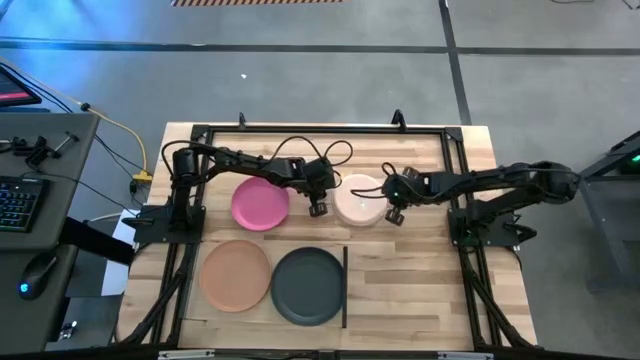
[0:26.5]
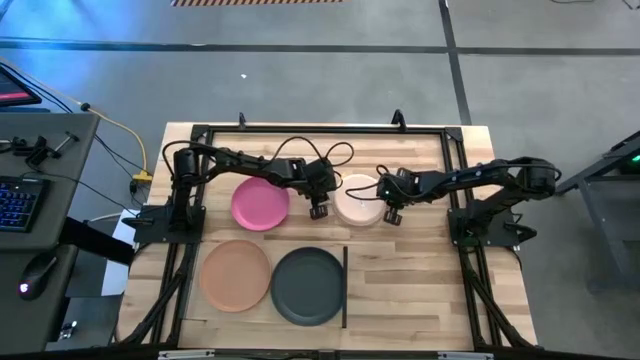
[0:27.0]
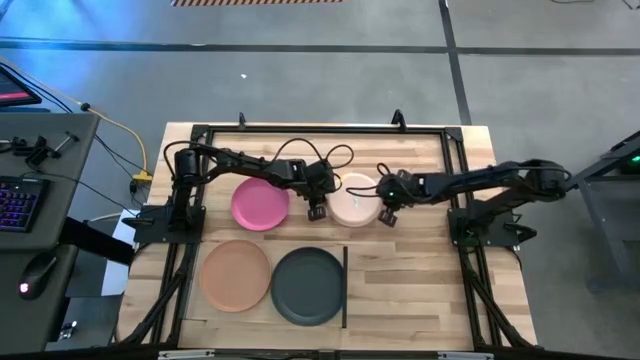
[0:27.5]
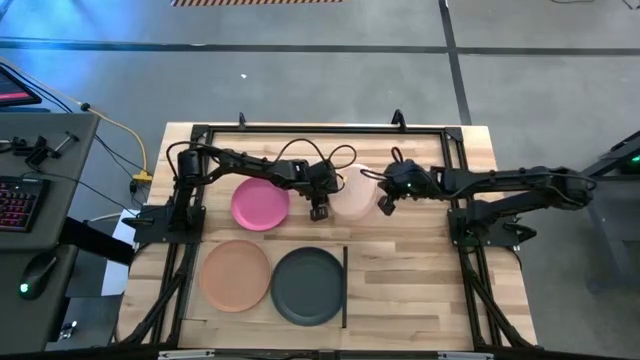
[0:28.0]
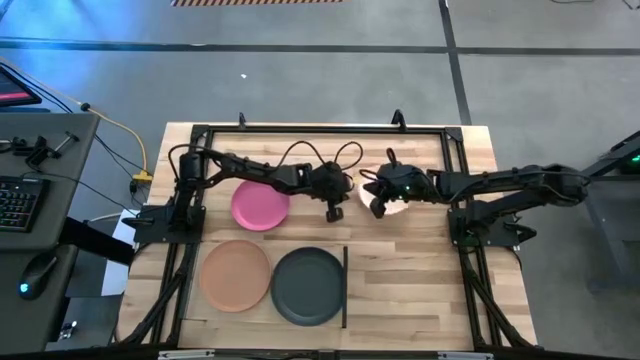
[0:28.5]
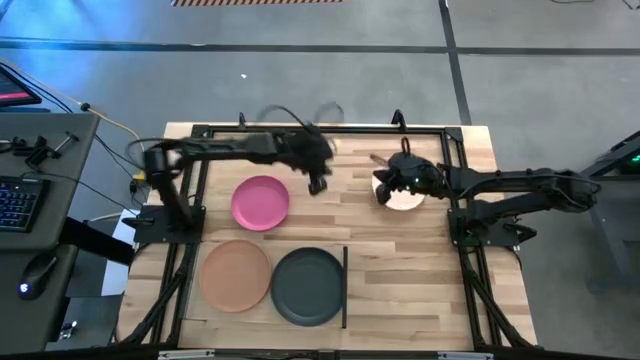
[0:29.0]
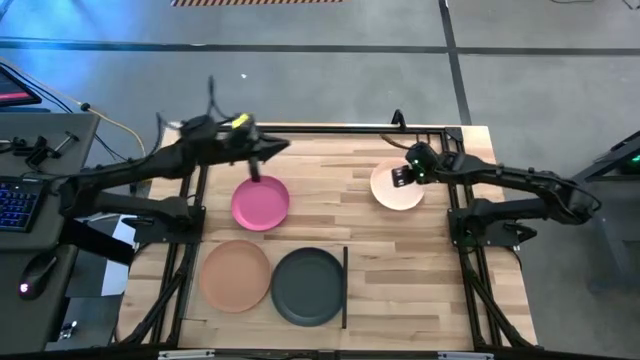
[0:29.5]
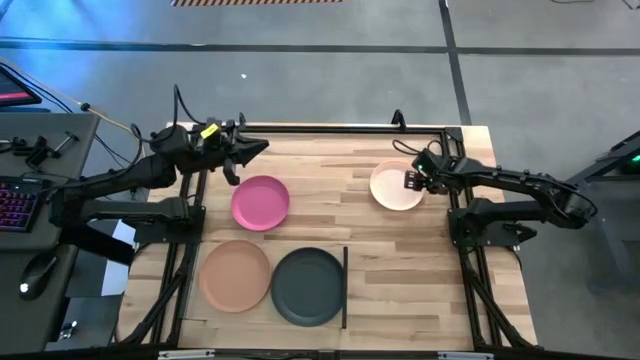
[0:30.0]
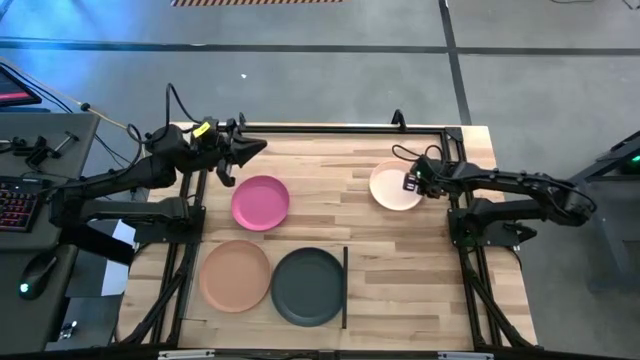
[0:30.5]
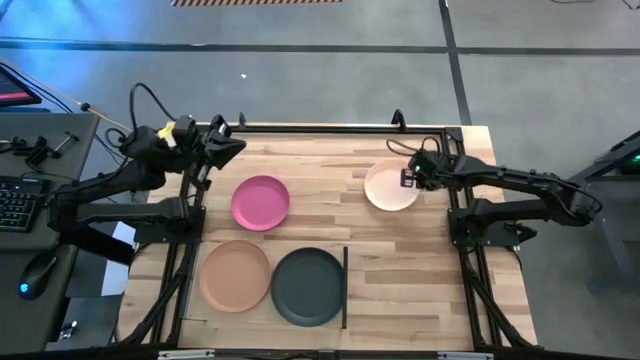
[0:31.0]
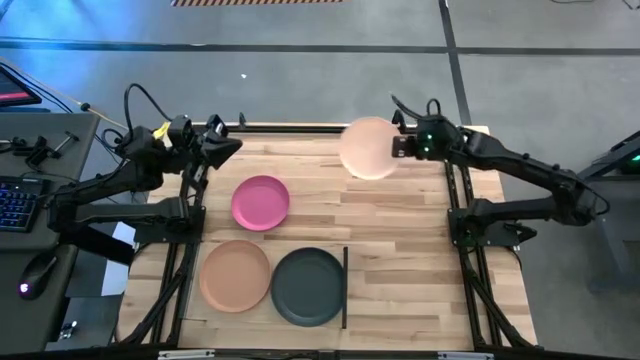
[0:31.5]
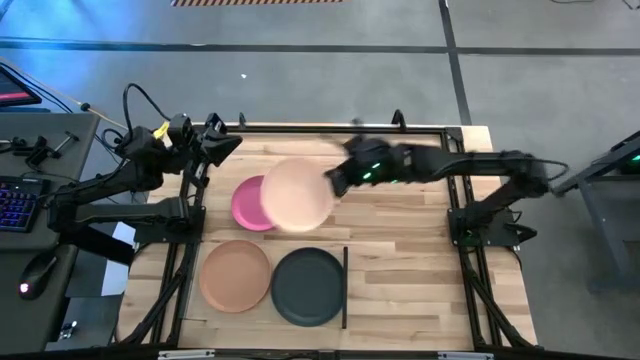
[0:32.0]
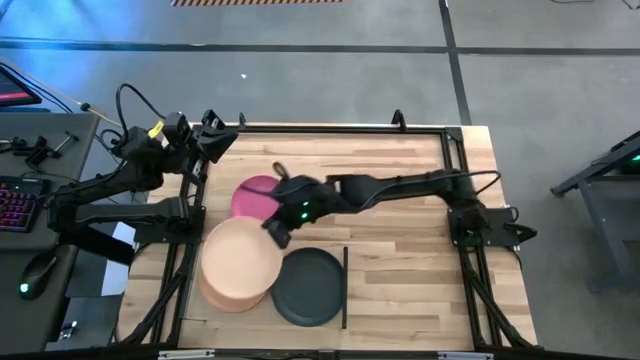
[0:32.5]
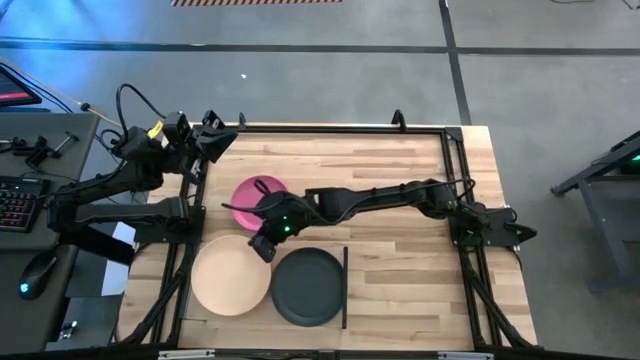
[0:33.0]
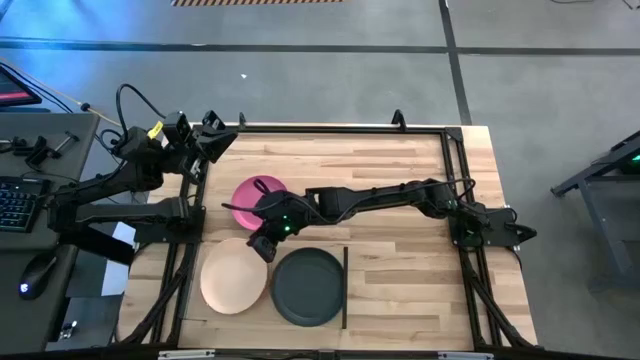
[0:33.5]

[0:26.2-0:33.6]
Task: Place and stack plates onto a shelf
Stack the light orange plate on top of the orange plate on the shelf

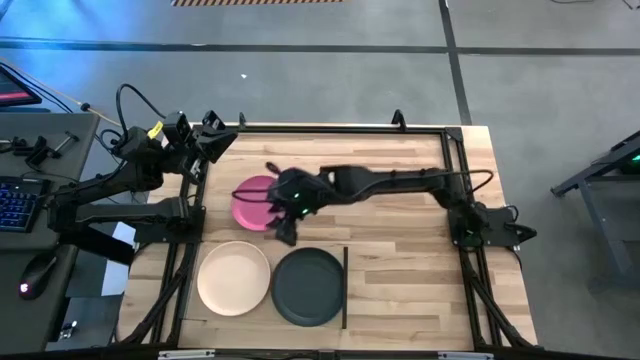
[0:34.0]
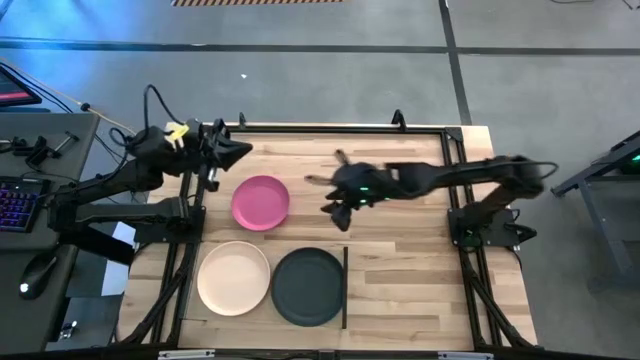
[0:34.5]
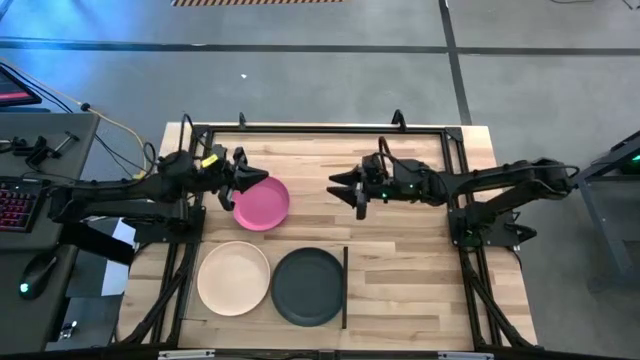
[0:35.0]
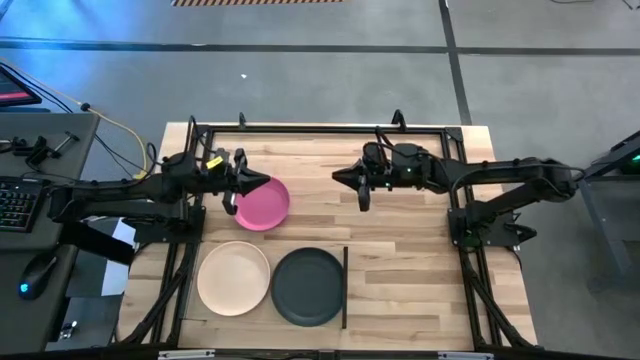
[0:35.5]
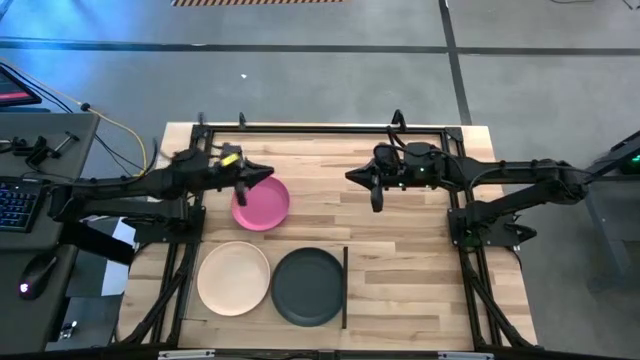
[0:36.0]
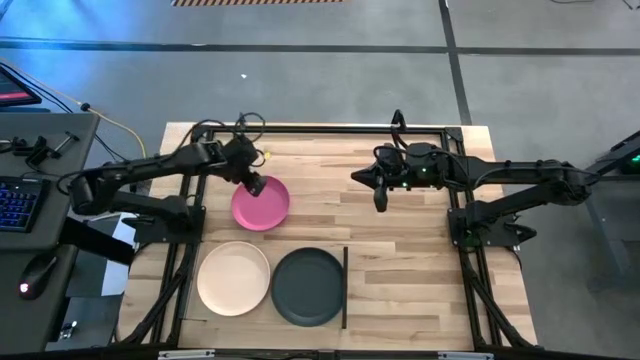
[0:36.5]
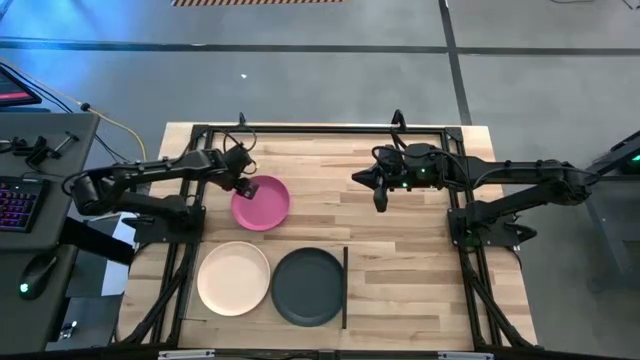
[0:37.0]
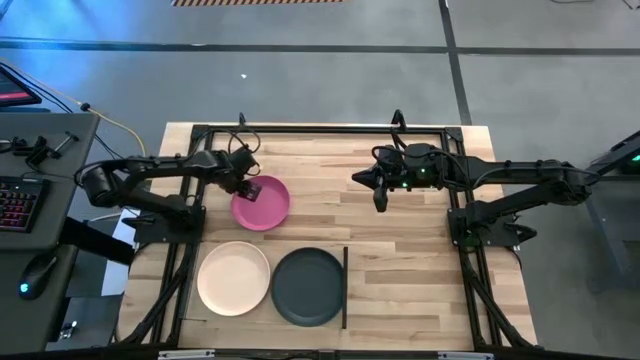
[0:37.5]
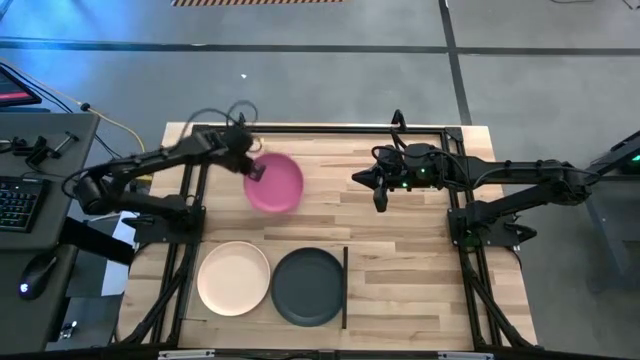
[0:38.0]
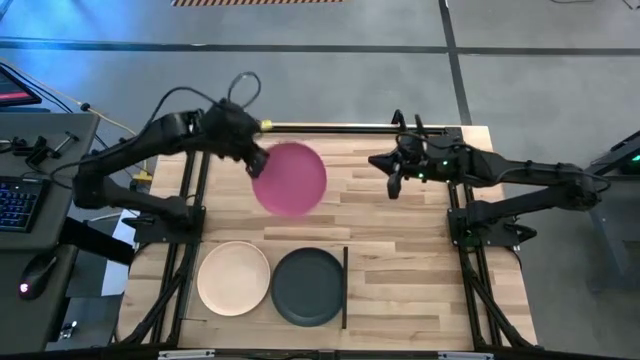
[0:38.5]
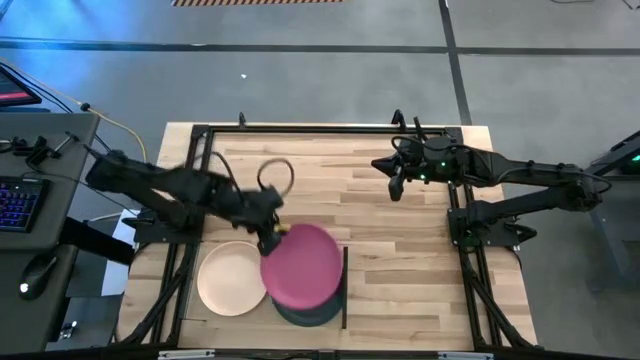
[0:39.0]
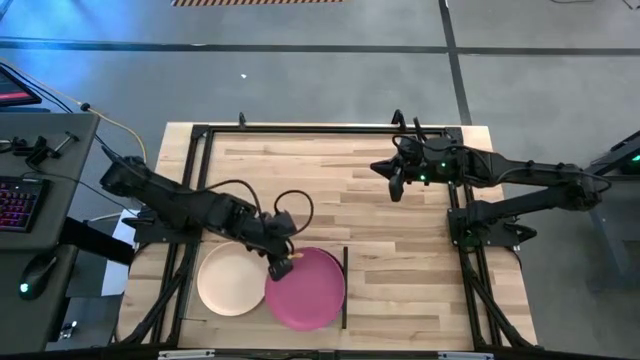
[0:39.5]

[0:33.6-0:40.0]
Stack the pink plate on top of the black plate on the shelf

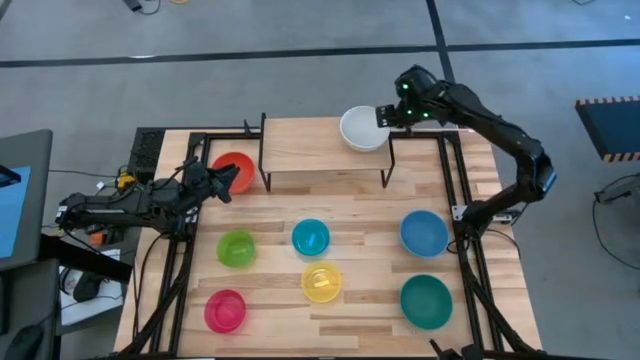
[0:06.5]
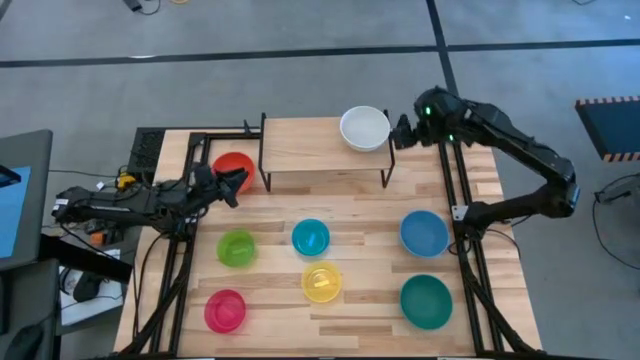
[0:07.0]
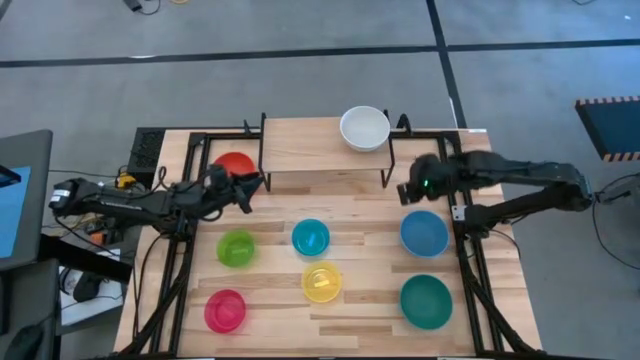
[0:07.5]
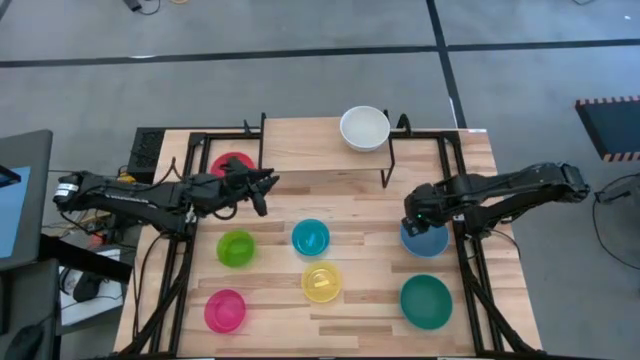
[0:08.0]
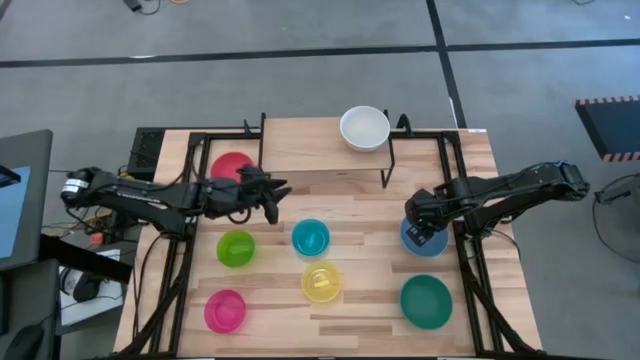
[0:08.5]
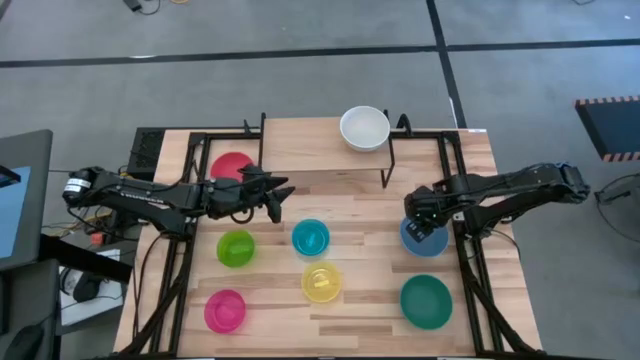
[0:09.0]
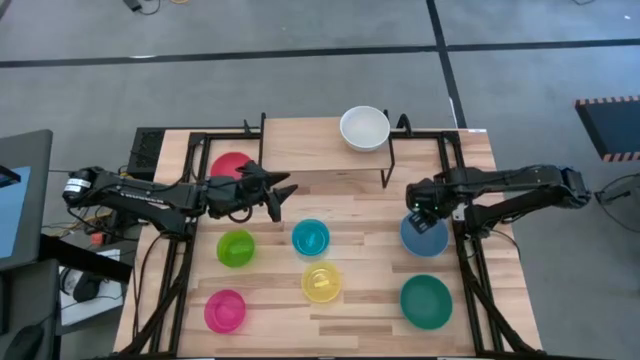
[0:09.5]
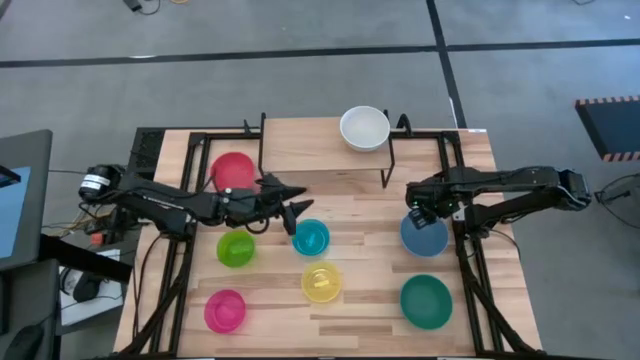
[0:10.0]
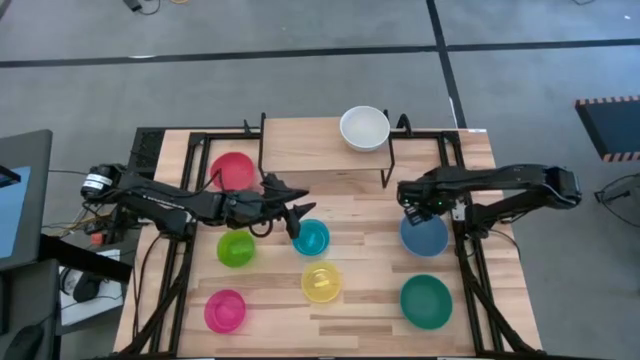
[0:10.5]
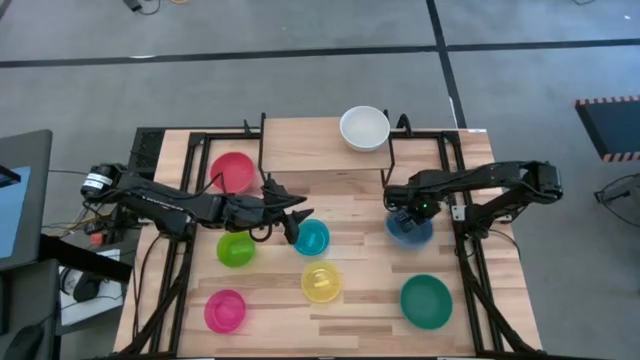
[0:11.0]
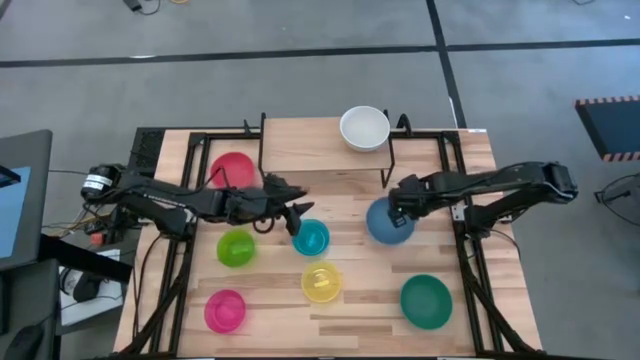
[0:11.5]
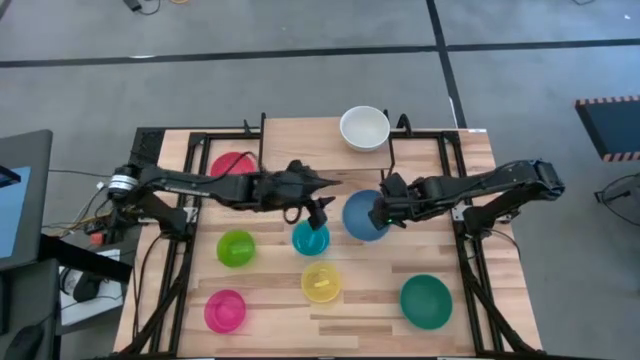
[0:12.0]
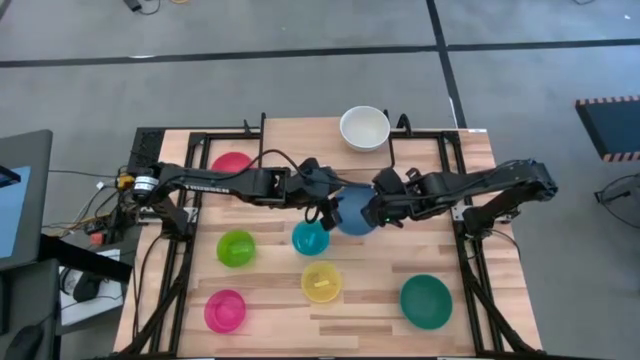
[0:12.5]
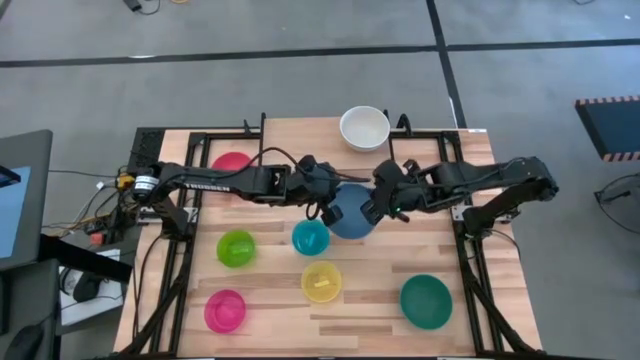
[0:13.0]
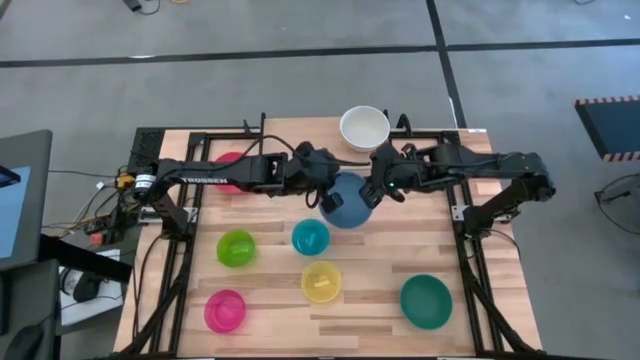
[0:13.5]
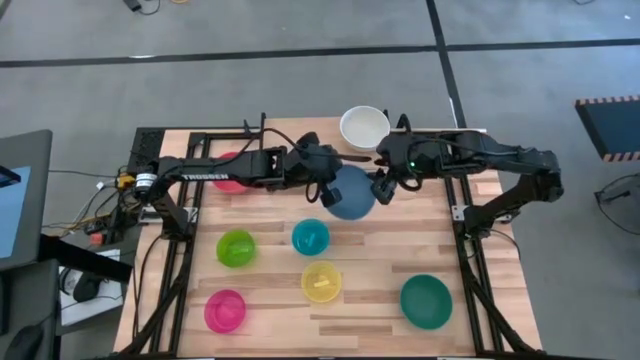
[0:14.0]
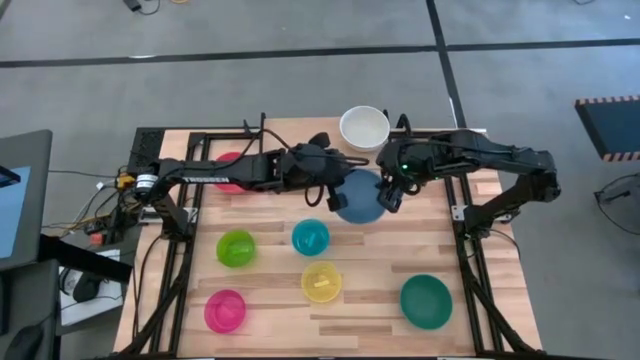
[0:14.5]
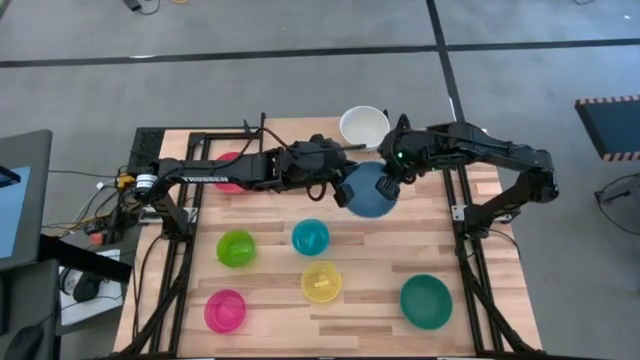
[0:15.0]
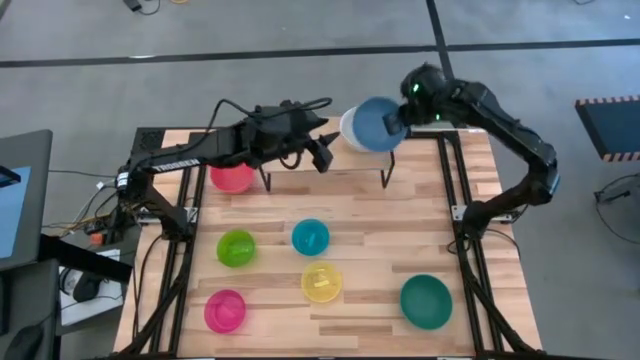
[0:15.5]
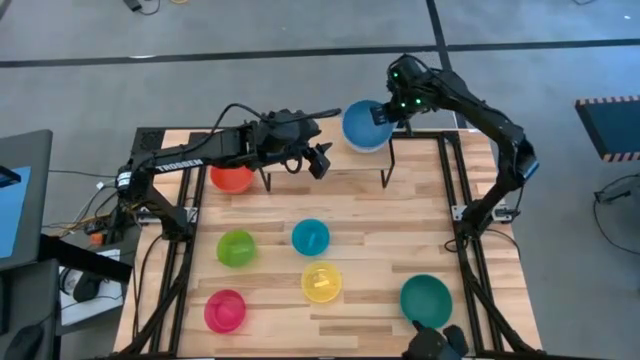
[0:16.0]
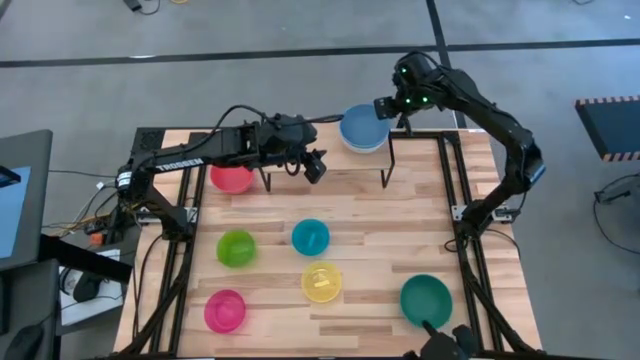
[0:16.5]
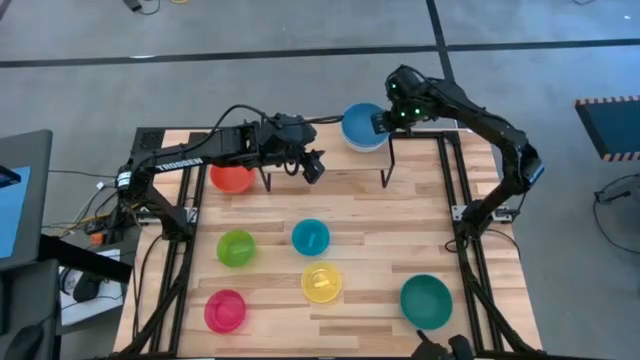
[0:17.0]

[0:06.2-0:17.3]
Task: Place and stack bowls onto a shelf
Stack the large blue bowl on top of the large white bowl on the shelf
